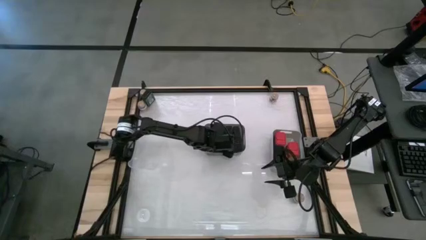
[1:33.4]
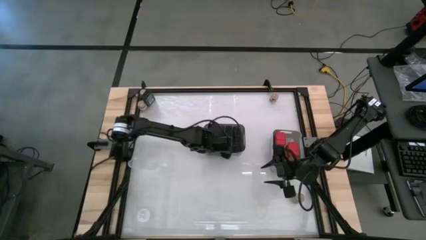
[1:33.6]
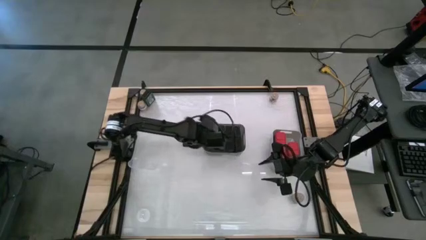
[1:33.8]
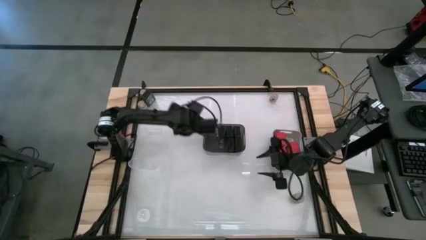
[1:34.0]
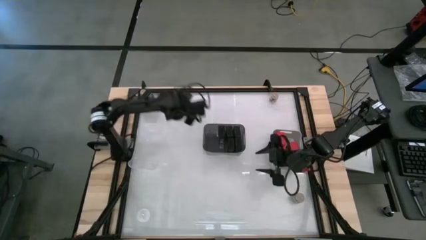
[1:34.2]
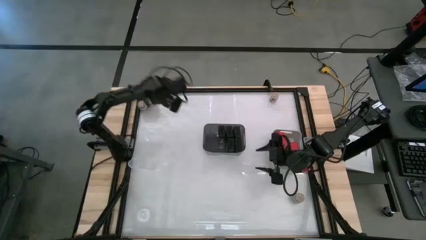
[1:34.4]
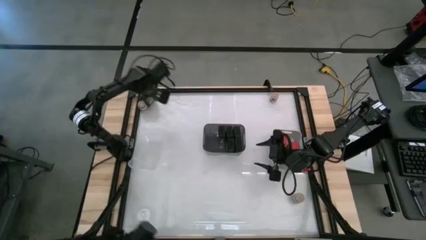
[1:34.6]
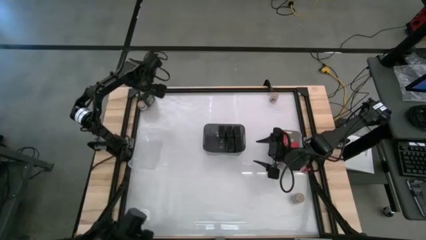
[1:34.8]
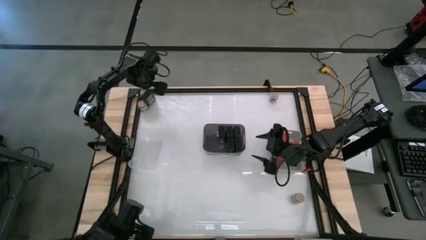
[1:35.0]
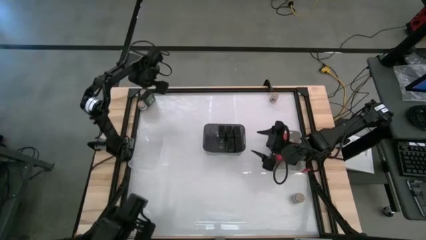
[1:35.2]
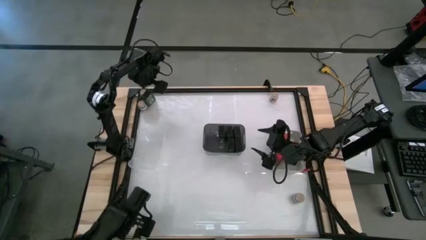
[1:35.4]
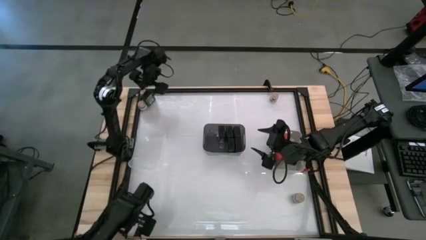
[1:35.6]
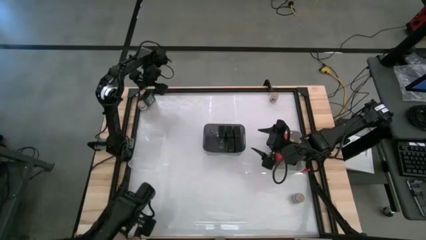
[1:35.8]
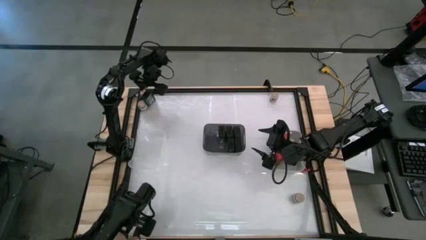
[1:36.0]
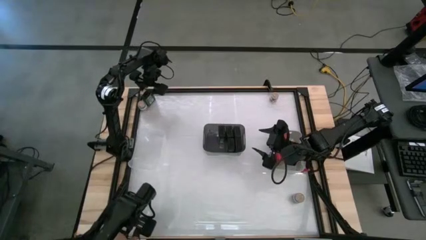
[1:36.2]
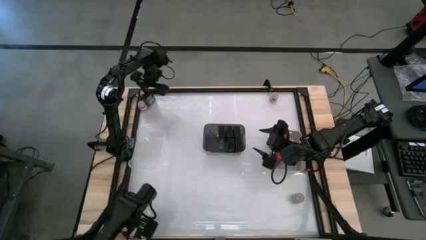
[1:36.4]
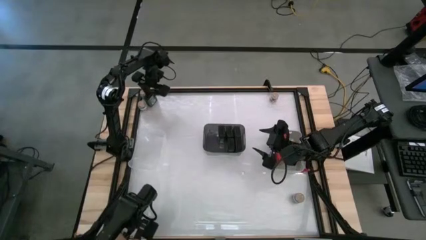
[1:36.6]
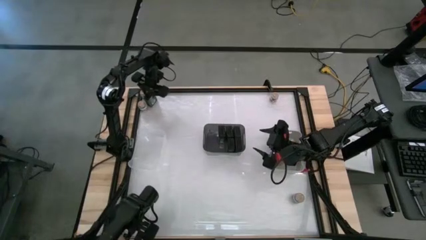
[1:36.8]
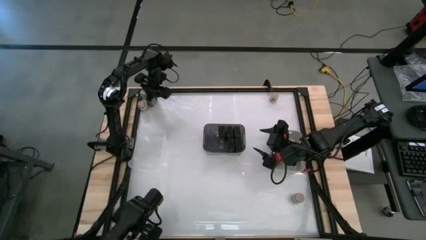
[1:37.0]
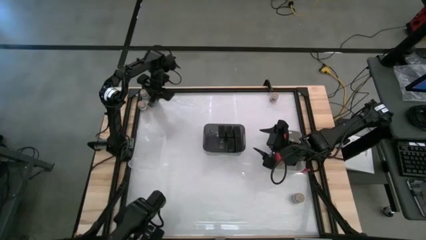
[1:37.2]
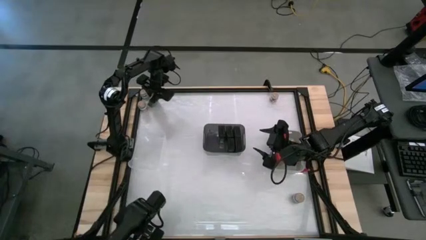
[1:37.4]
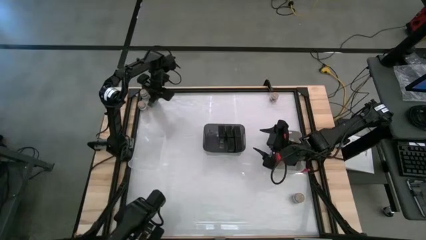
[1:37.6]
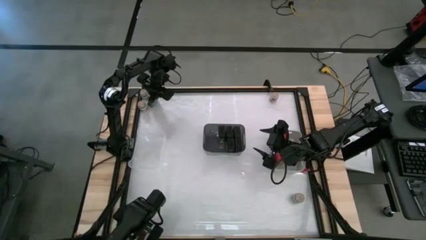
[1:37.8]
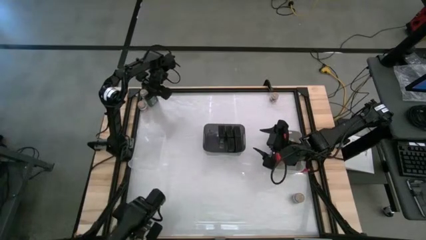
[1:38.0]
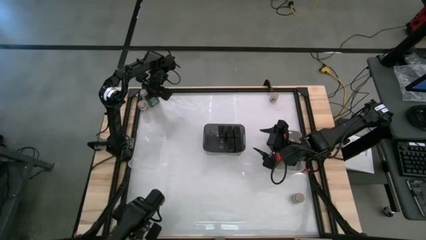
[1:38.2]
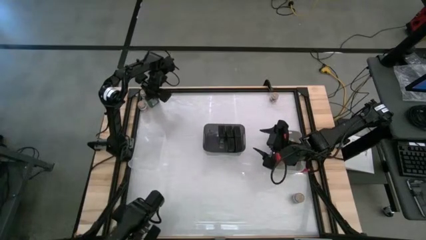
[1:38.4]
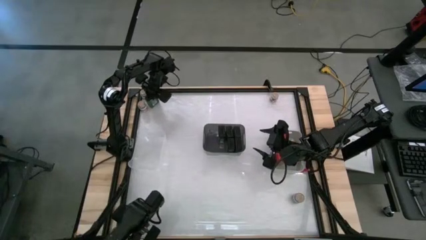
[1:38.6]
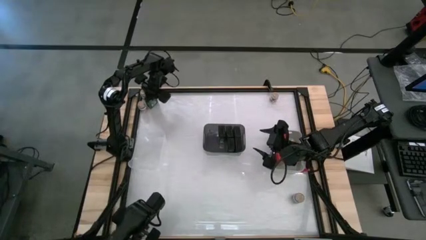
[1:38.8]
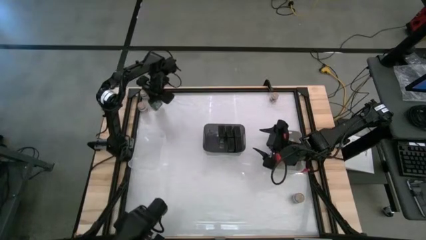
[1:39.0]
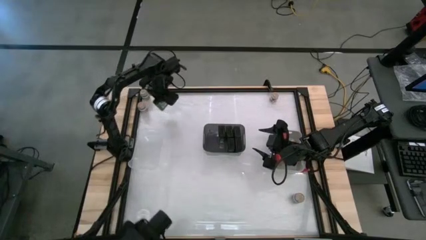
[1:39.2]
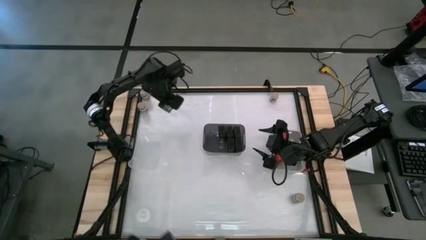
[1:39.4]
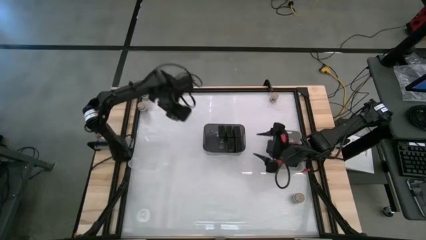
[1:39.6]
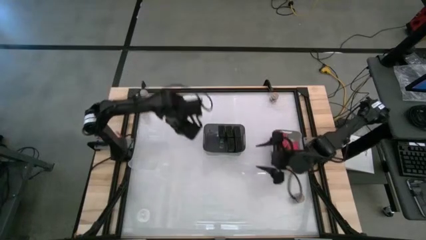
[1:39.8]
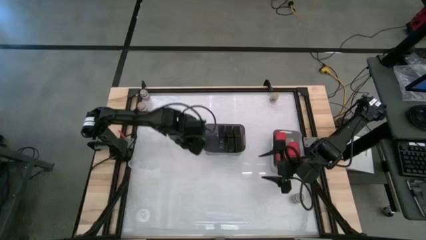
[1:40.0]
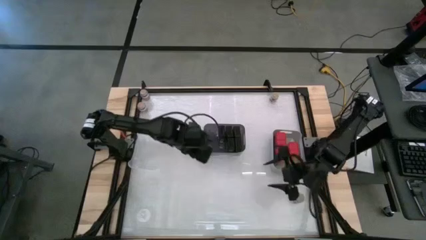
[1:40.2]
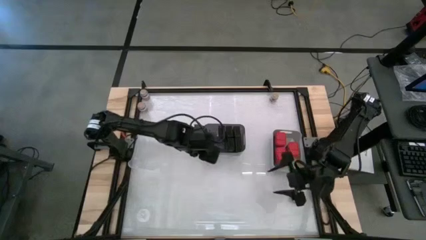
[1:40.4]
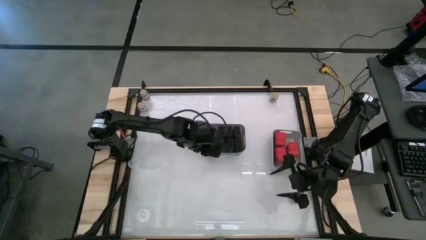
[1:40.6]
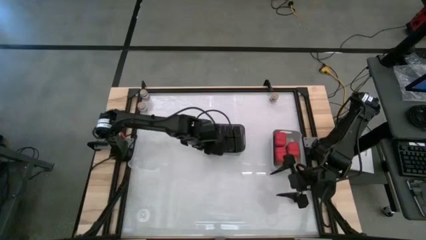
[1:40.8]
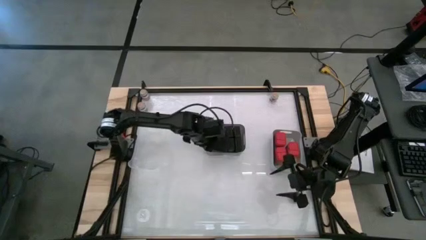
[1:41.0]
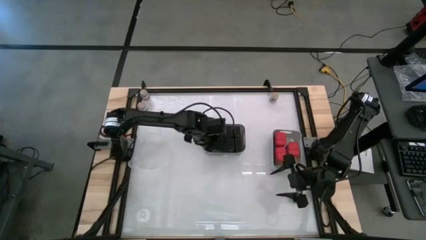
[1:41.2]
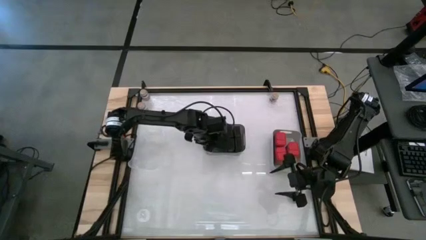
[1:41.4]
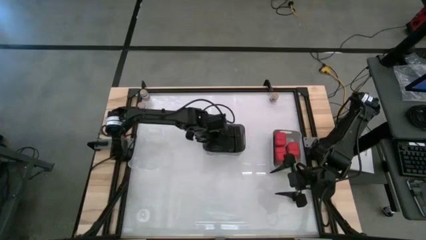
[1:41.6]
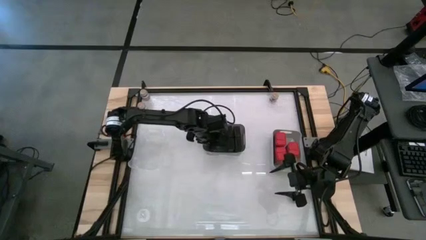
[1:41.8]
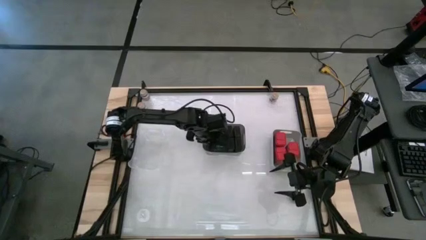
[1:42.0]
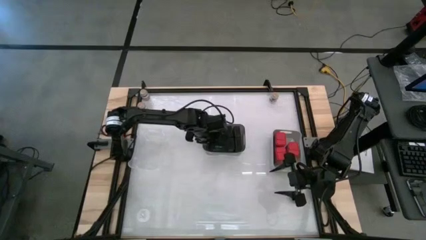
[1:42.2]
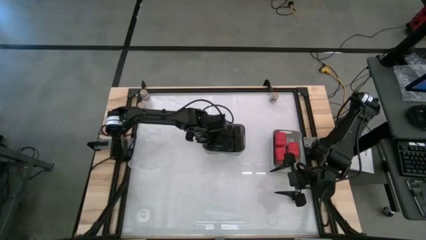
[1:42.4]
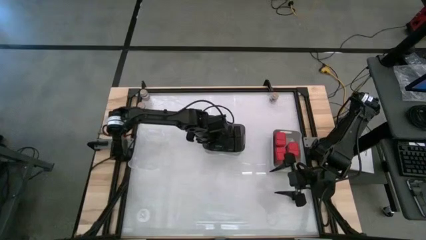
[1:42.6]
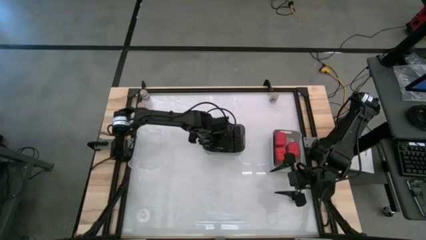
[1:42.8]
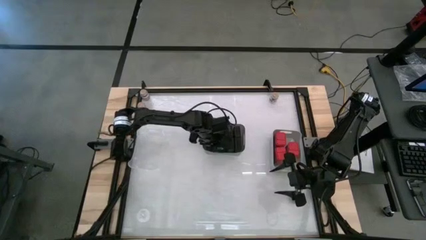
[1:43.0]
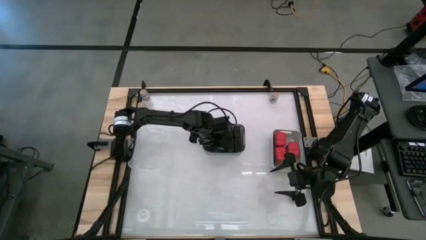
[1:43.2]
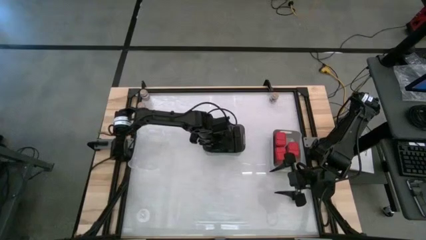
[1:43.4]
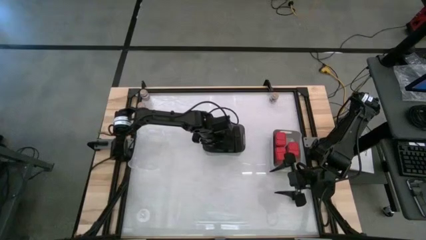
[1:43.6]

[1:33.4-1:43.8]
Task: Sort spices by type
Put the green spice can into the gray bin

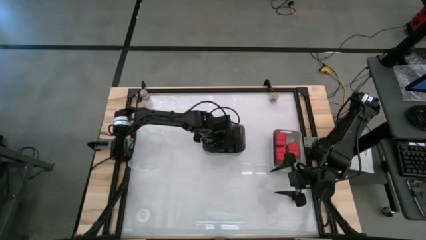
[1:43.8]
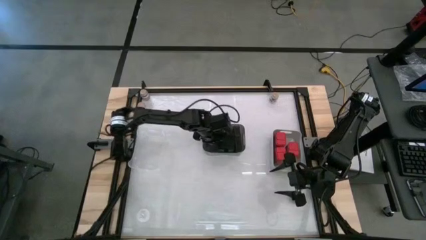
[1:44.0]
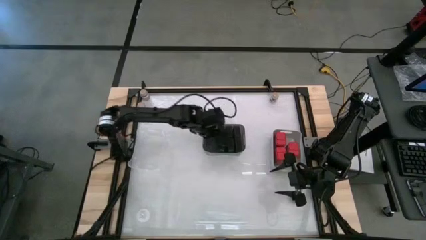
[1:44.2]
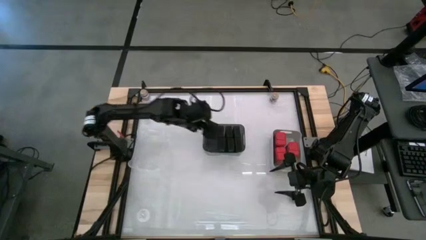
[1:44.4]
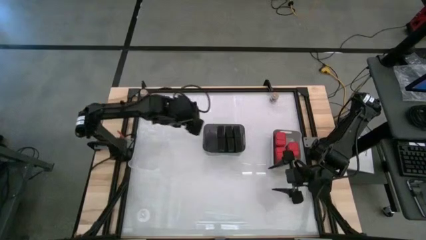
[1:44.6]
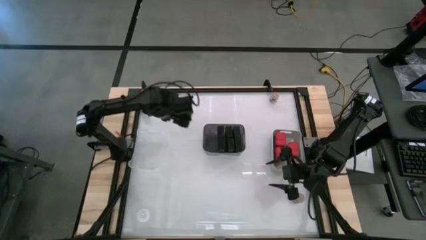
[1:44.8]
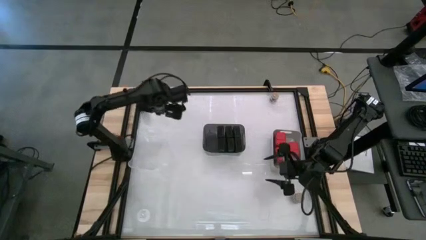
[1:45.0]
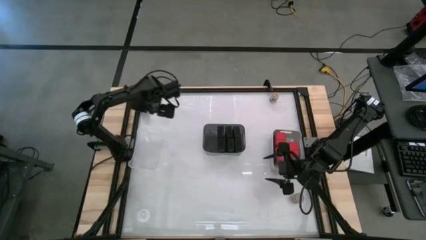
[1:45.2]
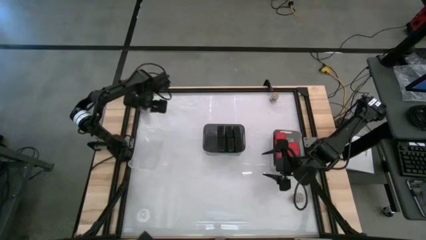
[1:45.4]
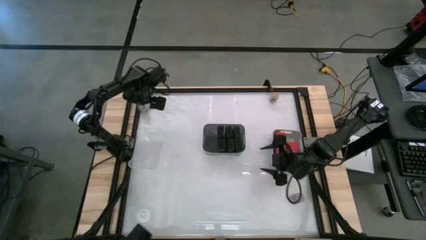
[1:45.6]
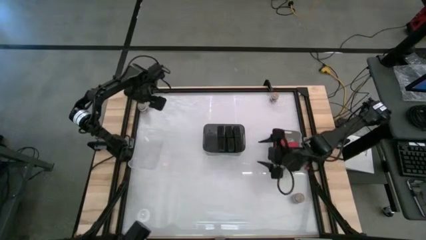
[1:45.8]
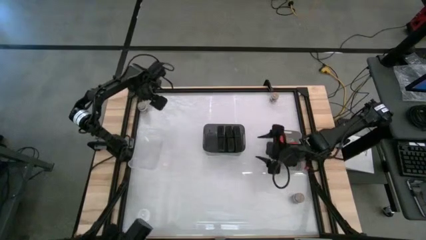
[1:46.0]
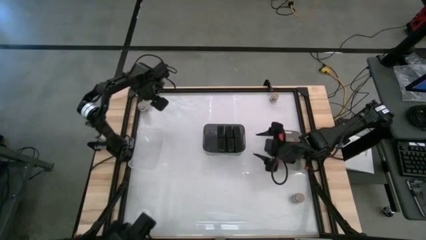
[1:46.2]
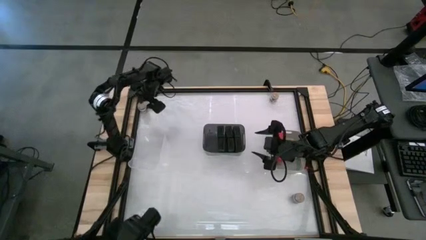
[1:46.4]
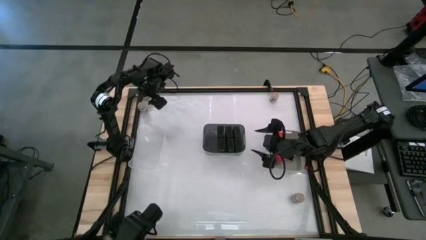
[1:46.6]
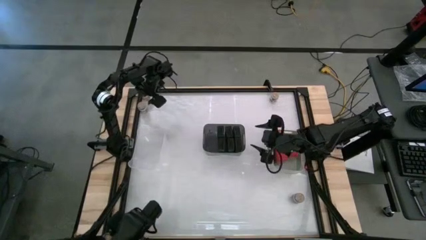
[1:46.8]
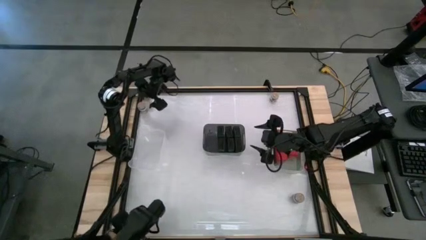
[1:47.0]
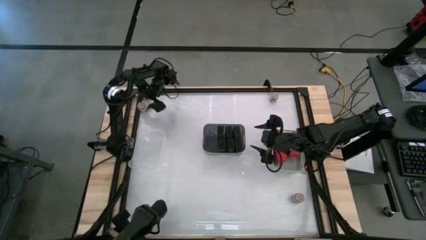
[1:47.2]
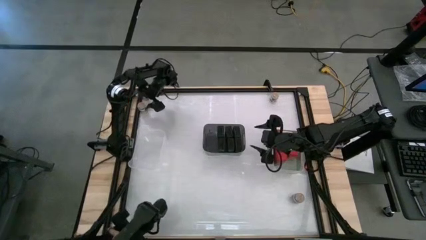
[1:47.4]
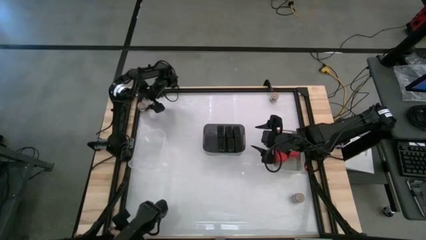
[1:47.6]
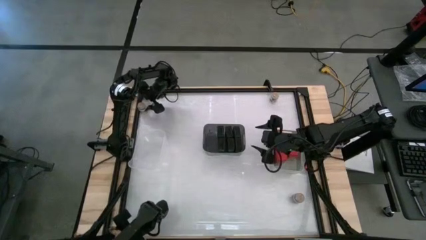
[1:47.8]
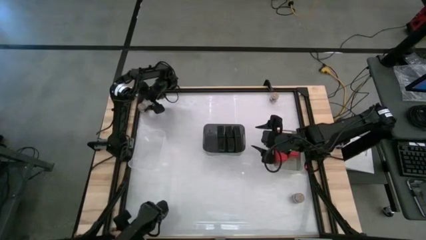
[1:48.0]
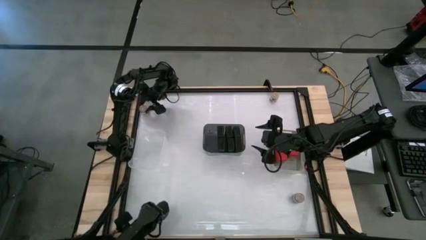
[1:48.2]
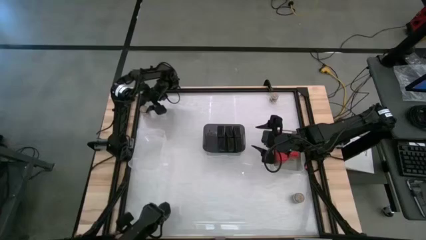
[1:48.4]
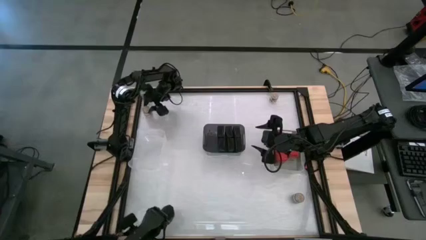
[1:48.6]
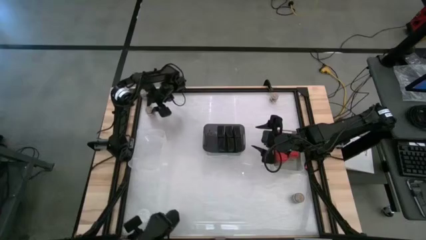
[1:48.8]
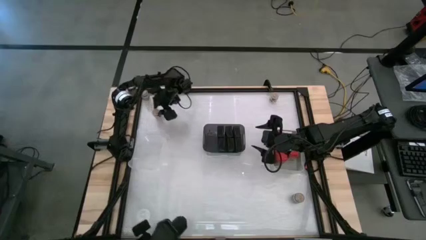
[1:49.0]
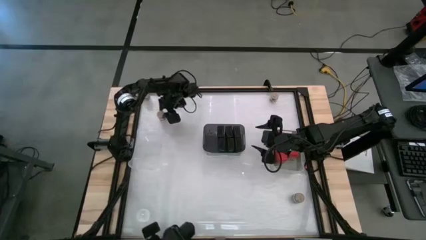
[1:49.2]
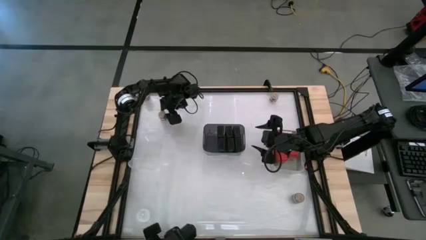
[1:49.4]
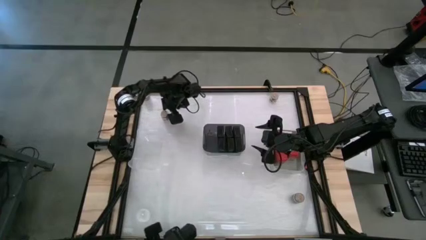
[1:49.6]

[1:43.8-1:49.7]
Put the brown spice bottle into the transparent bin
